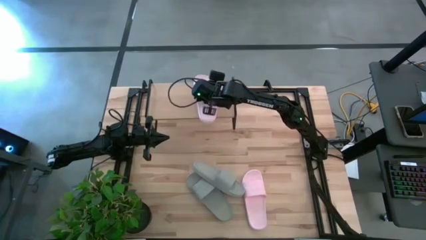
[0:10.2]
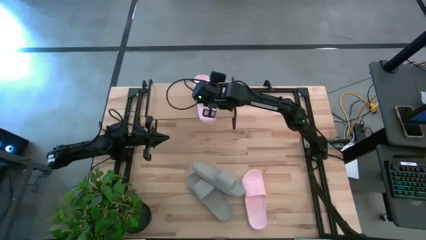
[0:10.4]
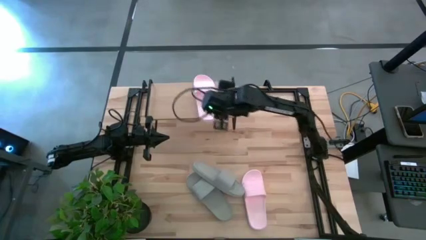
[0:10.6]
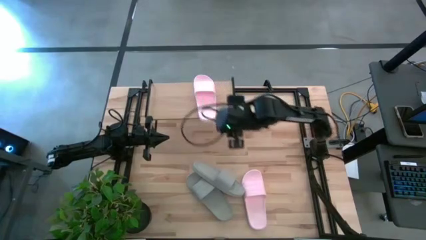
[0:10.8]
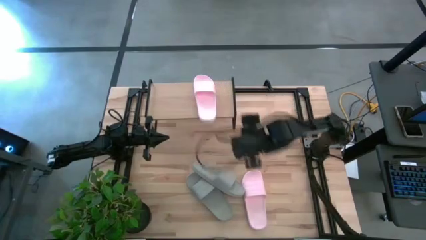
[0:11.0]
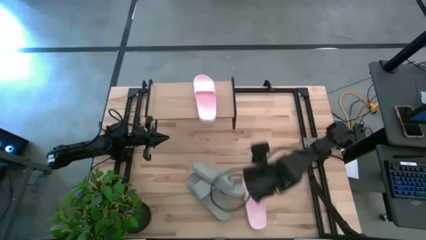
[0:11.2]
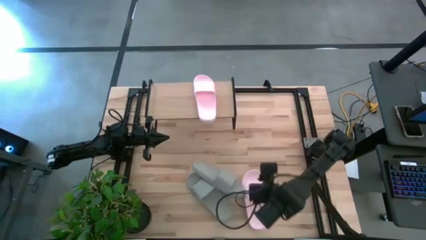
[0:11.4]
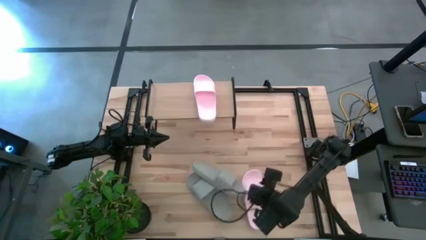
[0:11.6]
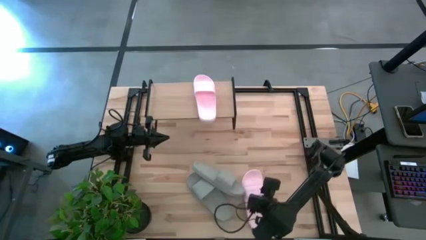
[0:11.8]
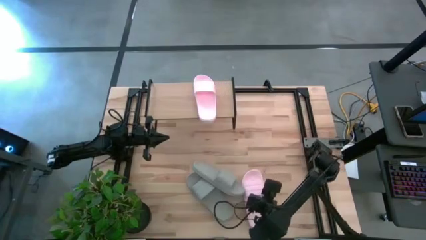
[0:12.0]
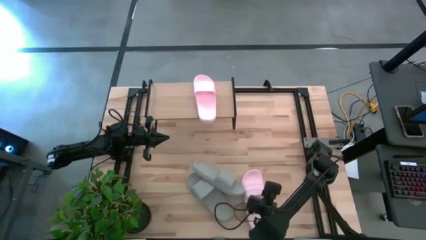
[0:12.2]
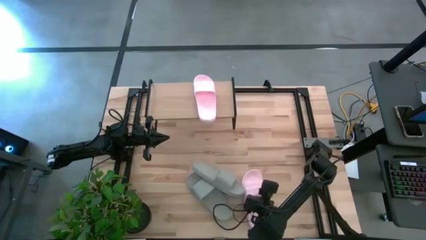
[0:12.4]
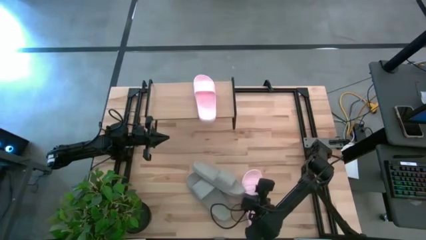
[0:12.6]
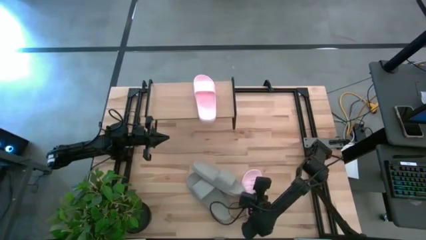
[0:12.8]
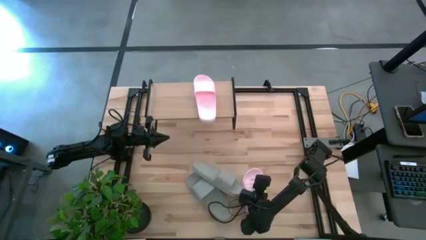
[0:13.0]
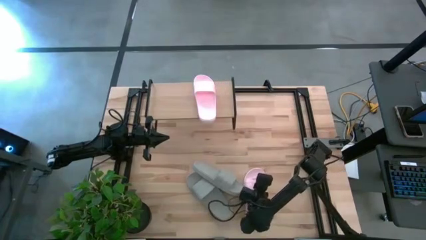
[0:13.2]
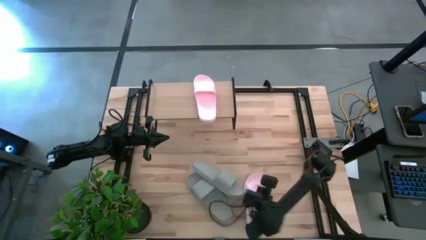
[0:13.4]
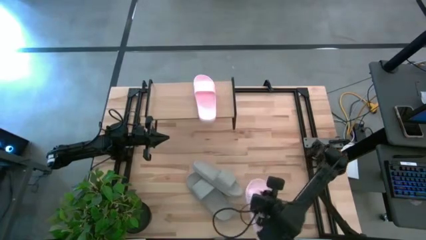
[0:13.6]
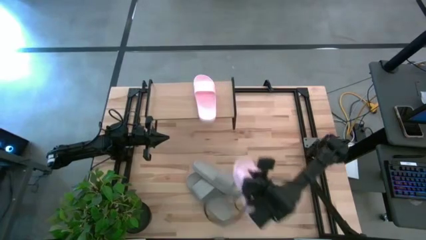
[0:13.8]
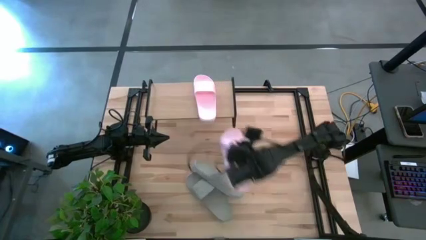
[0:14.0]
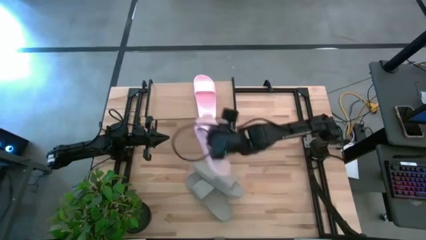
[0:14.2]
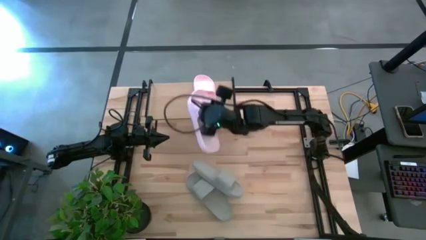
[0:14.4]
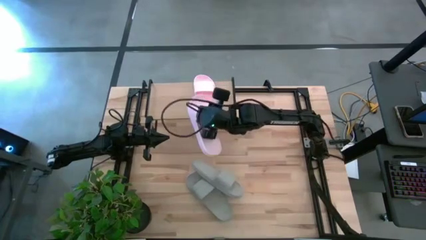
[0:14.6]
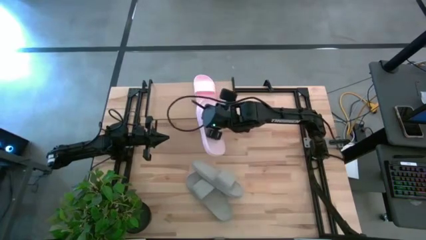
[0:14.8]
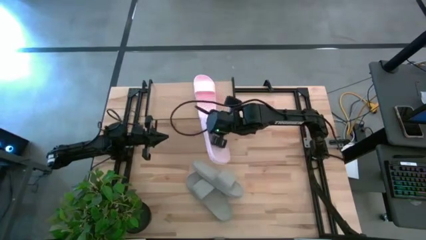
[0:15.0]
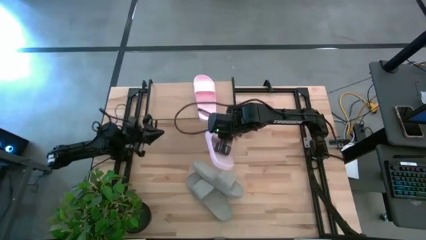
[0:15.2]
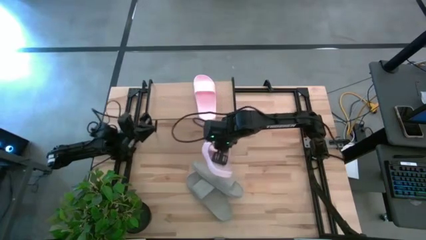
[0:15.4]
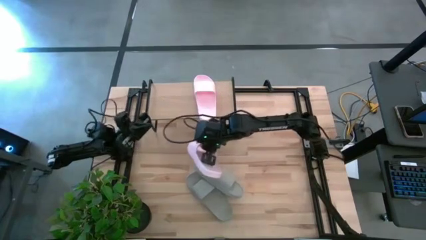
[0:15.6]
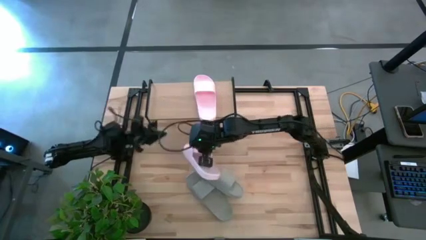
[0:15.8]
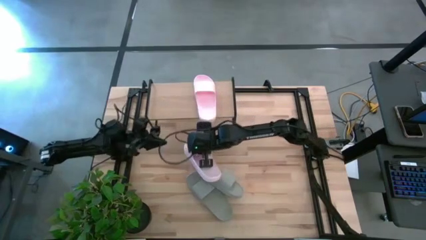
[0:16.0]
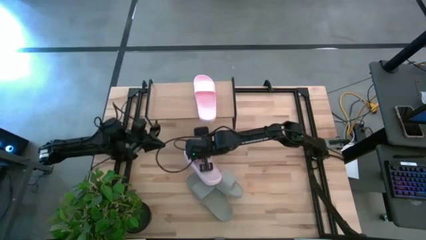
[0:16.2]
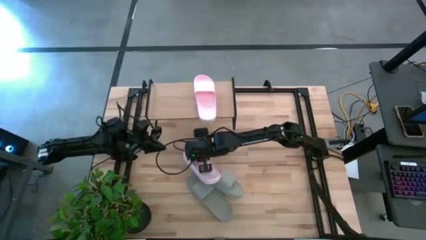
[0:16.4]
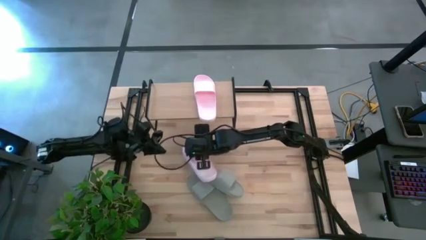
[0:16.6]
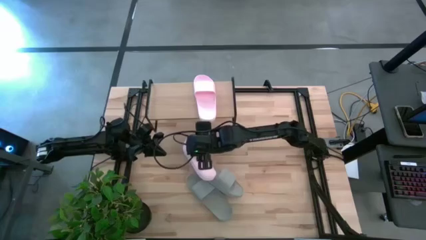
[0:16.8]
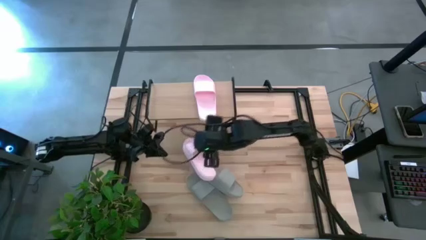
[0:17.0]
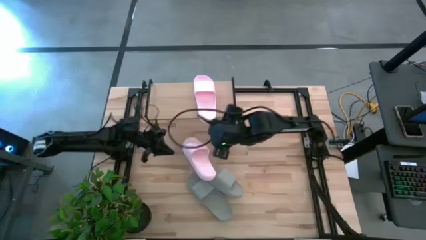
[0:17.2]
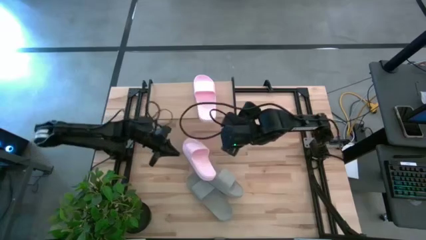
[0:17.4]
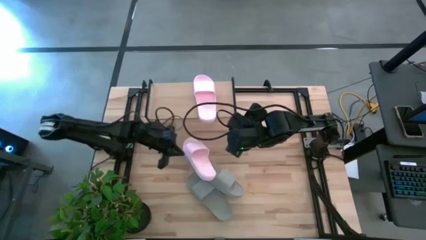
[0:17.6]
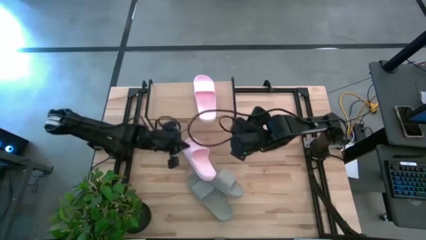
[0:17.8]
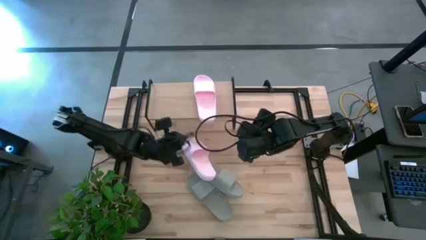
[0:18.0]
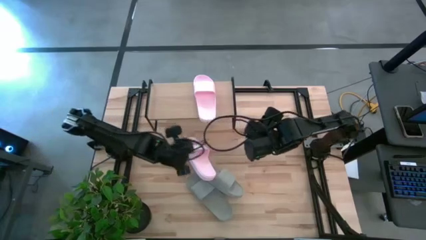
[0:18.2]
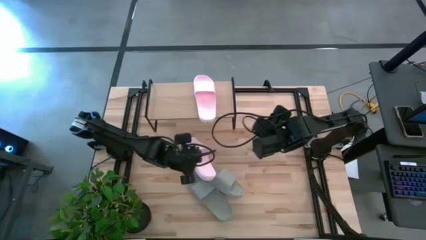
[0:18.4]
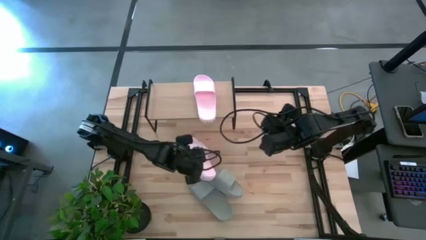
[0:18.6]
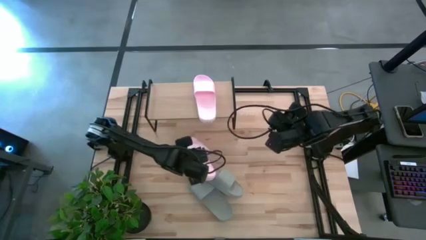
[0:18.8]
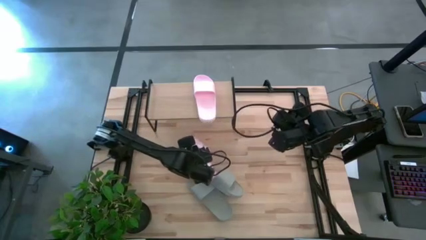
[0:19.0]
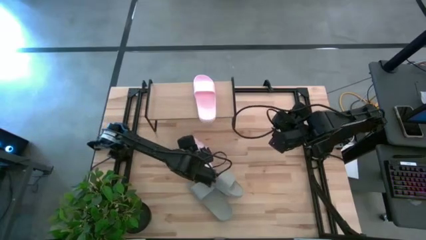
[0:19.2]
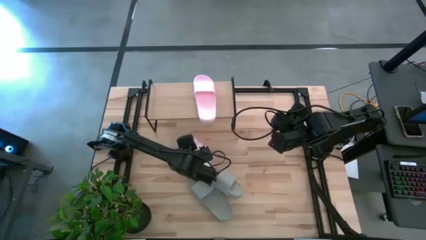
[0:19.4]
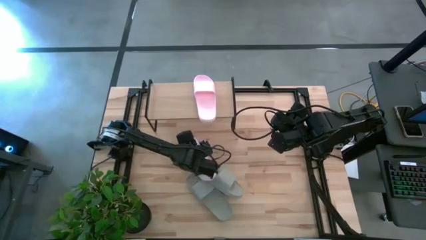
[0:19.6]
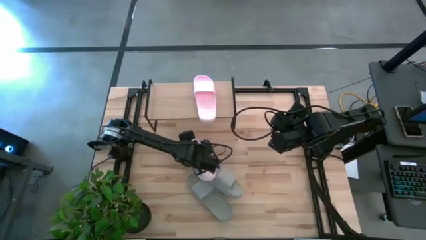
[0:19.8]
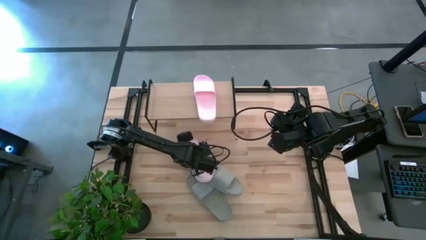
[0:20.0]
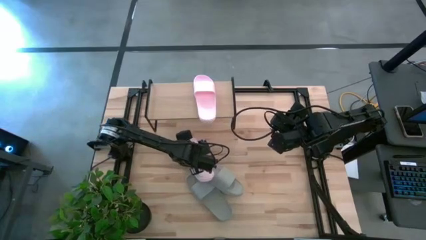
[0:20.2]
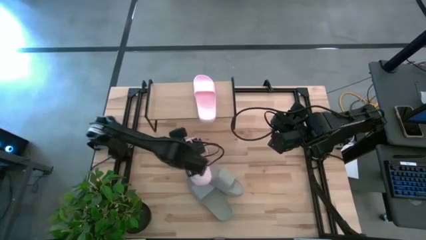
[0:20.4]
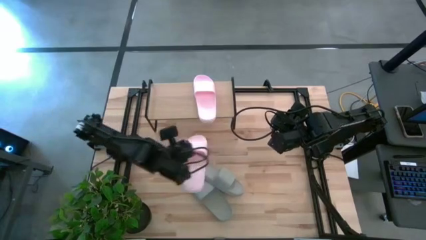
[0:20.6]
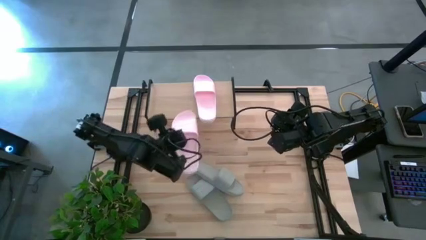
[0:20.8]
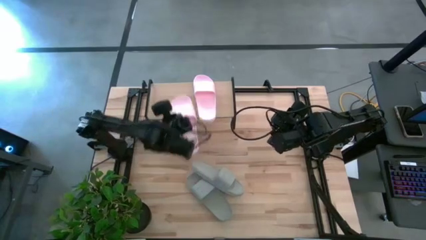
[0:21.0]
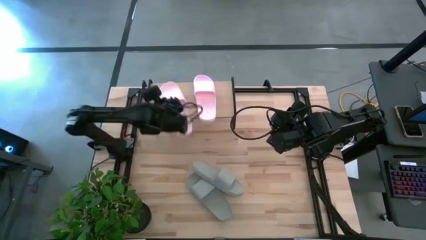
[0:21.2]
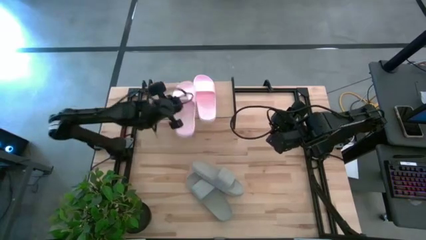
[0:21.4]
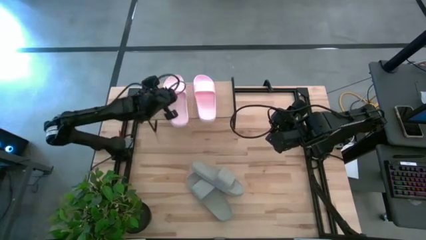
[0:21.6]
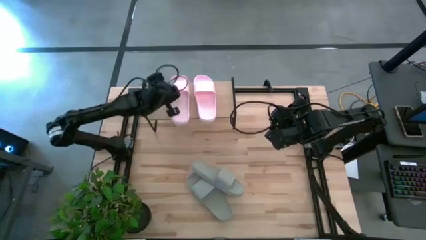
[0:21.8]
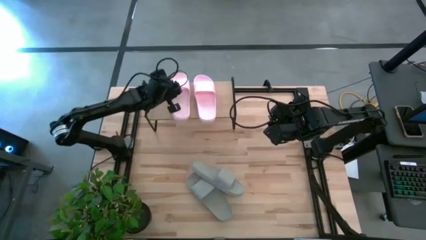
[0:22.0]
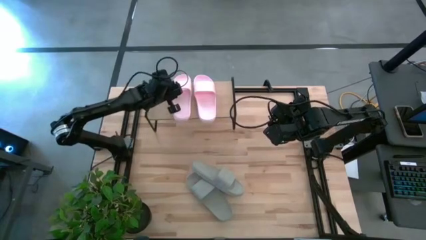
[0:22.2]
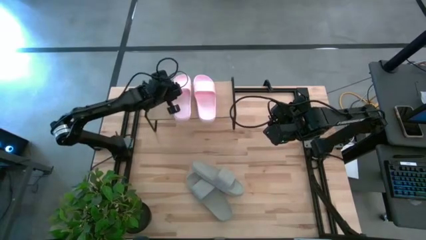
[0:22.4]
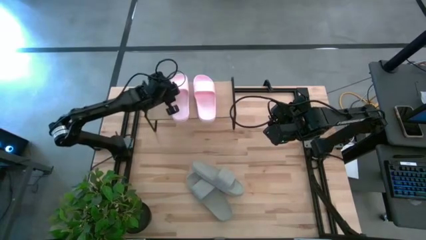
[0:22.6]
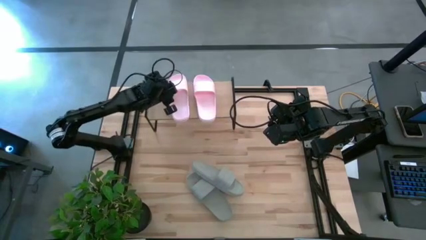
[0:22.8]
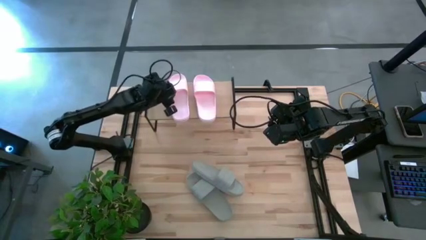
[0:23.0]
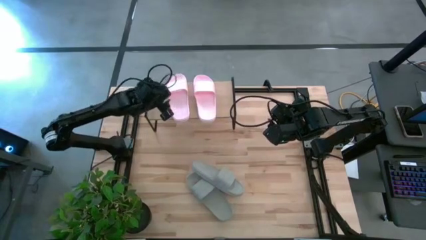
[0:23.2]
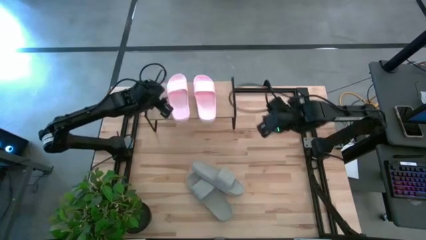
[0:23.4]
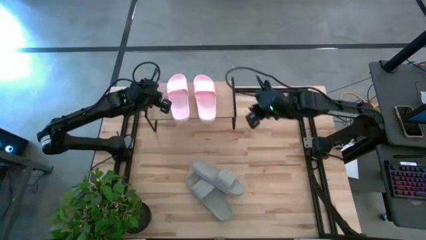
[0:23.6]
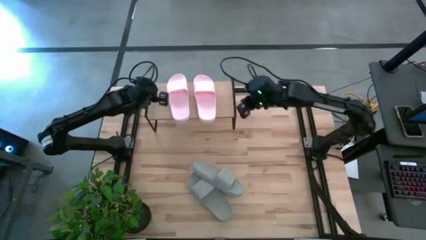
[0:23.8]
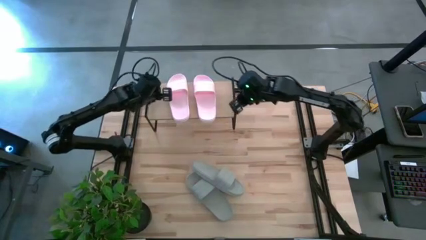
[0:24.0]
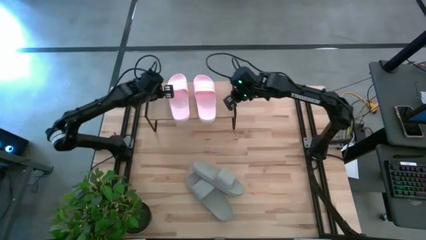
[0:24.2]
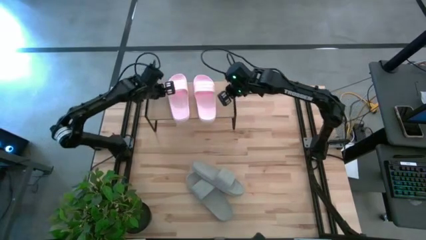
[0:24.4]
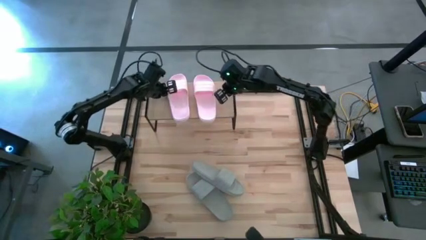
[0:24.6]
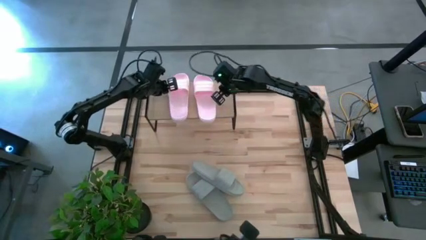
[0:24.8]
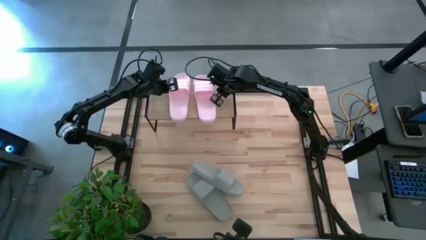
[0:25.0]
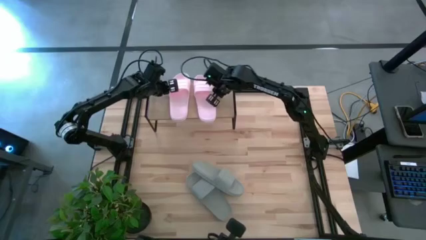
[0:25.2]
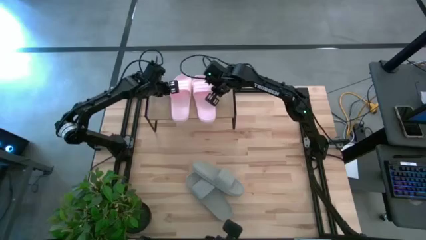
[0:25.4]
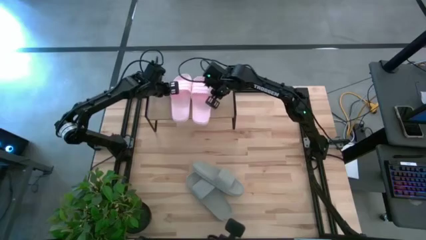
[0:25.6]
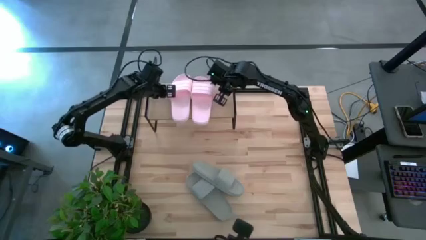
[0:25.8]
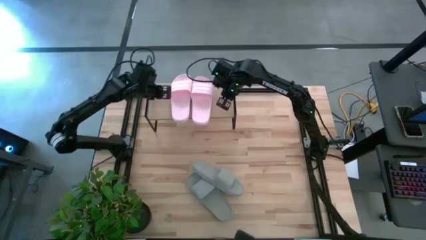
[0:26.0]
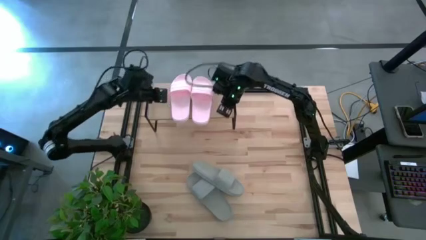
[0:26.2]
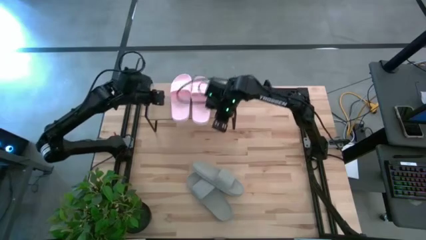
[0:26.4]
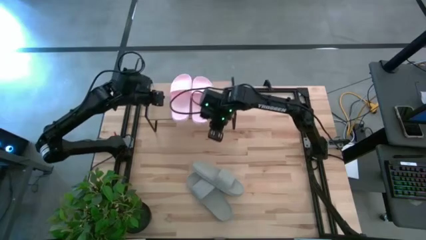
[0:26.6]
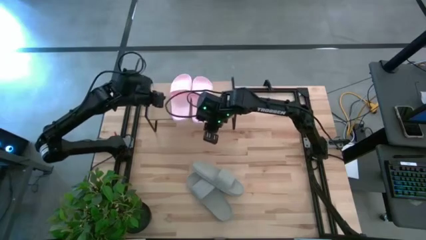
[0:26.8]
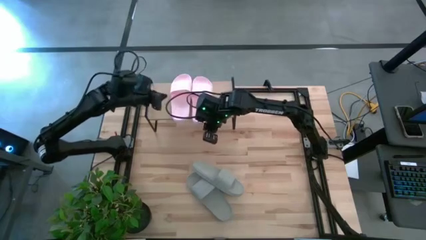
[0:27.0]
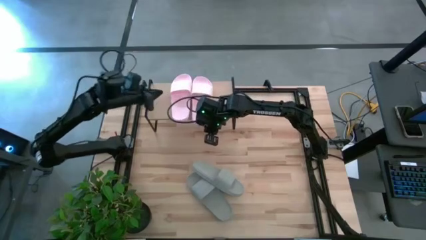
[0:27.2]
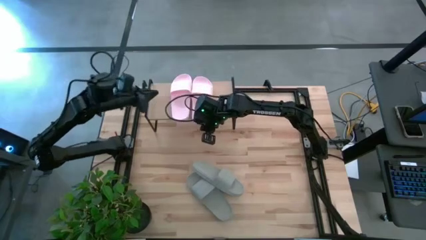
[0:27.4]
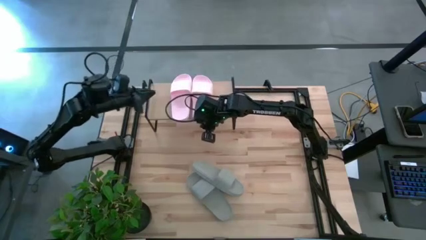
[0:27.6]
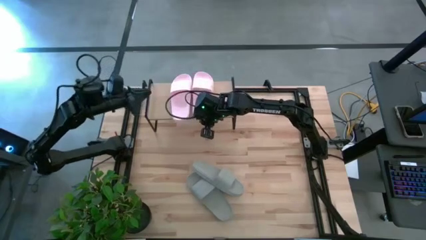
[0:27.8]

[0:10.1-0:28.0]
Task: Pick and place slides into the shelf
Put the pink slipper on the shelf
